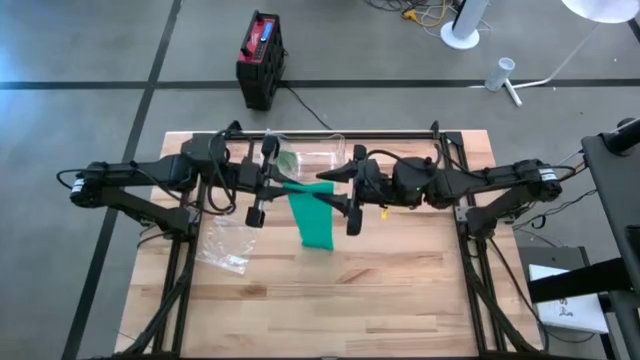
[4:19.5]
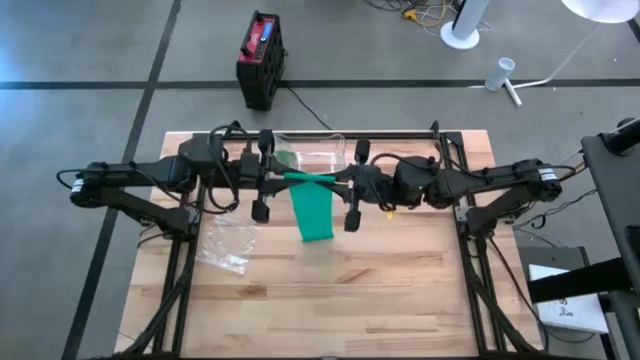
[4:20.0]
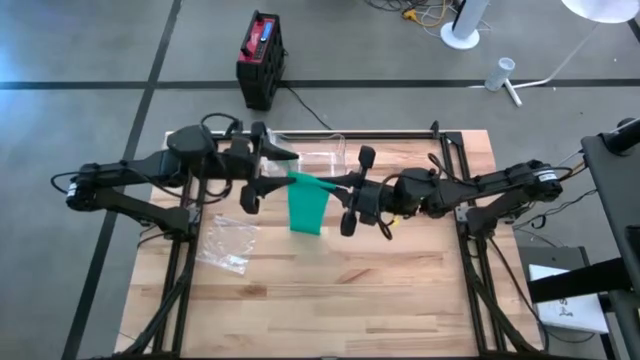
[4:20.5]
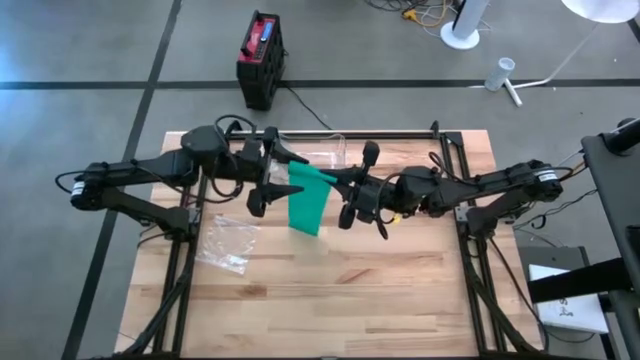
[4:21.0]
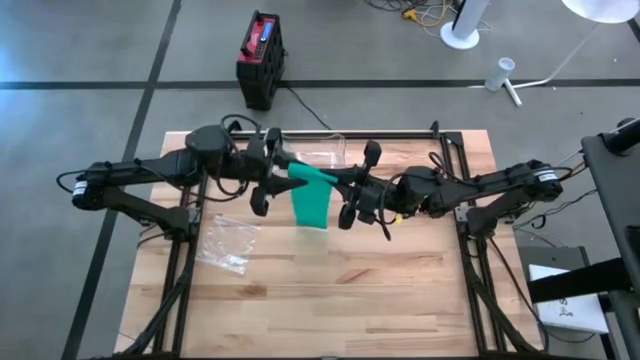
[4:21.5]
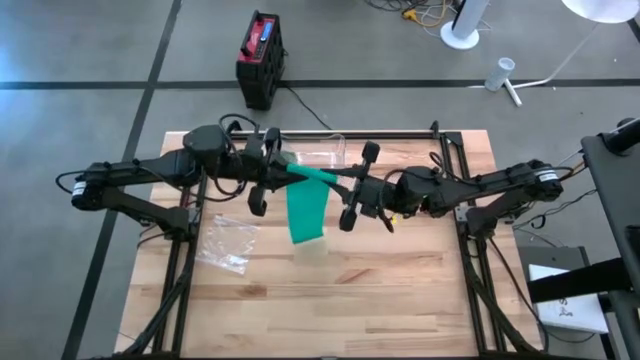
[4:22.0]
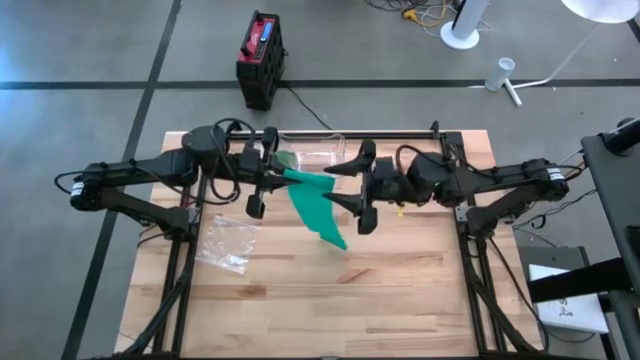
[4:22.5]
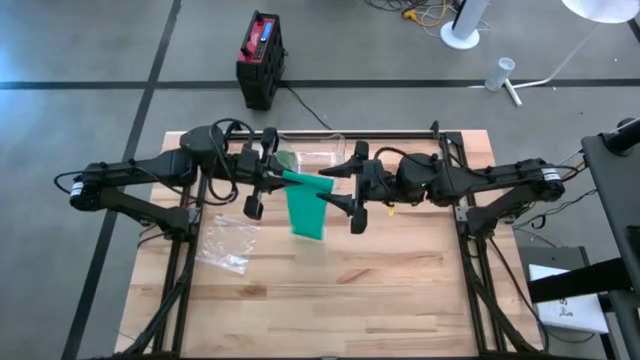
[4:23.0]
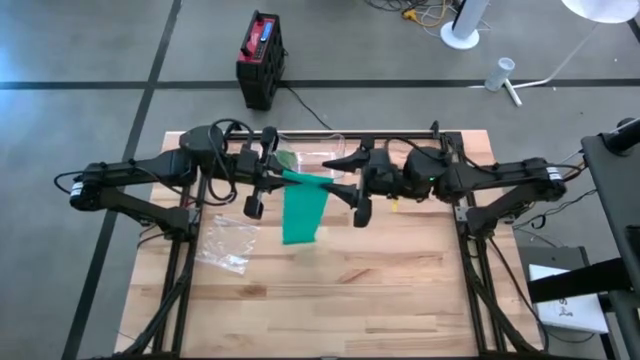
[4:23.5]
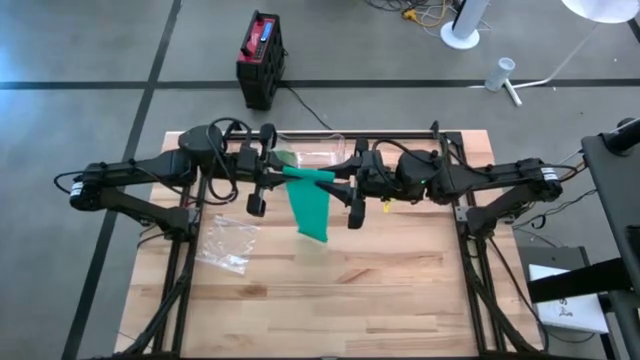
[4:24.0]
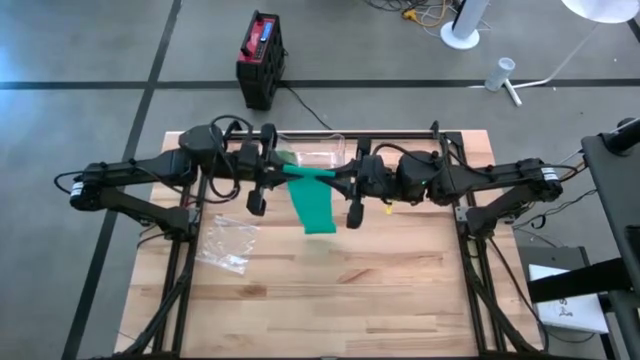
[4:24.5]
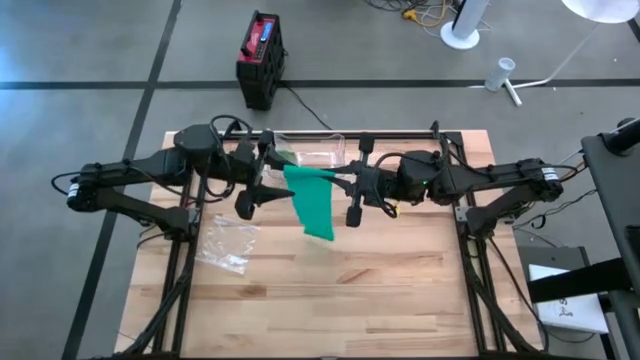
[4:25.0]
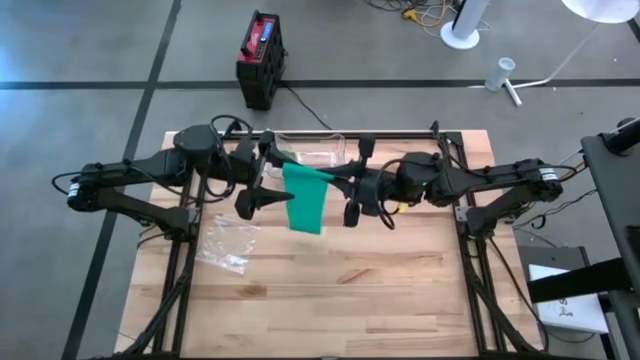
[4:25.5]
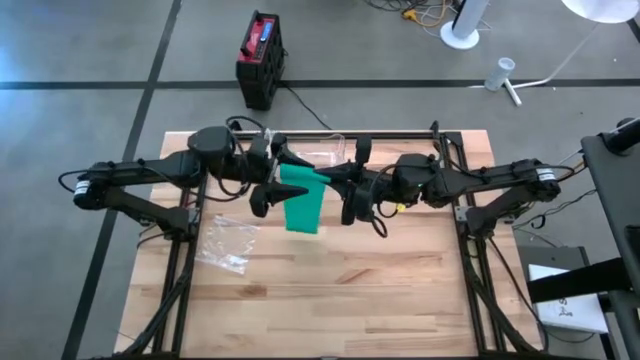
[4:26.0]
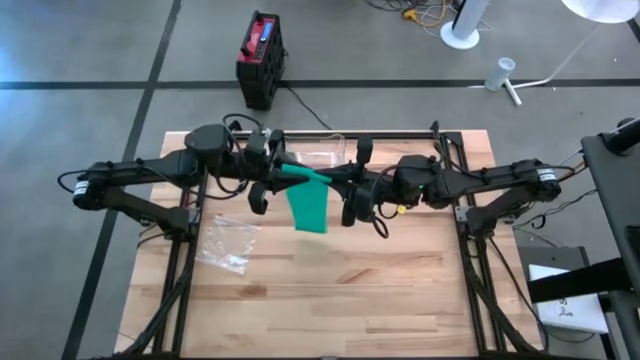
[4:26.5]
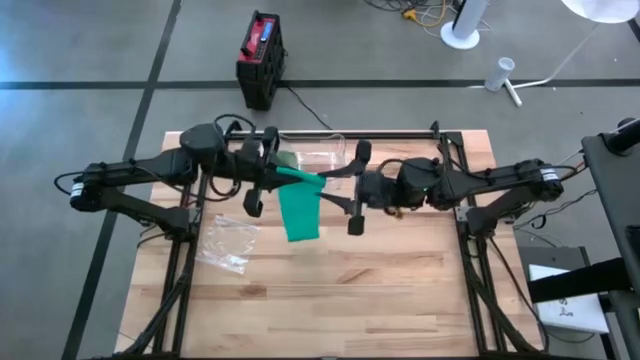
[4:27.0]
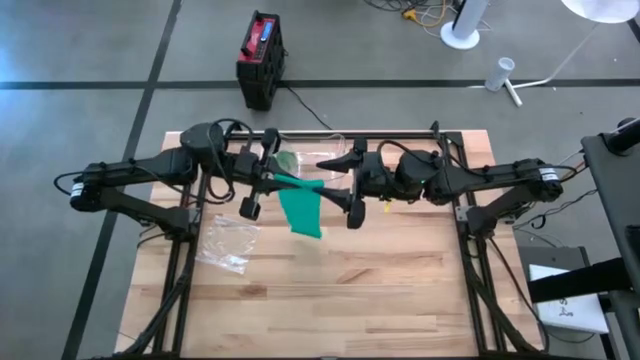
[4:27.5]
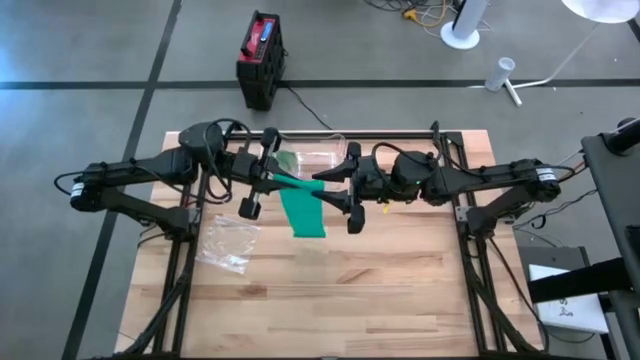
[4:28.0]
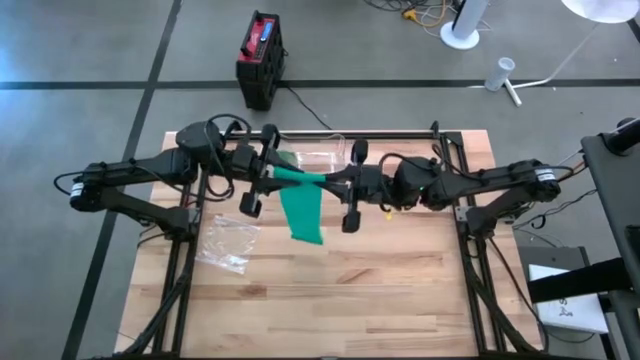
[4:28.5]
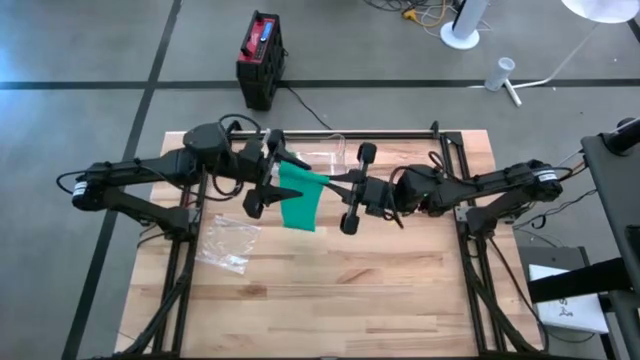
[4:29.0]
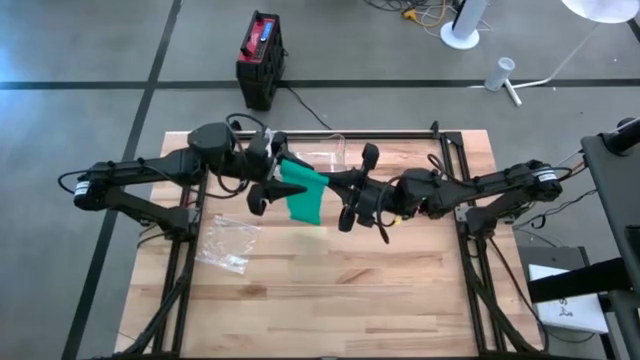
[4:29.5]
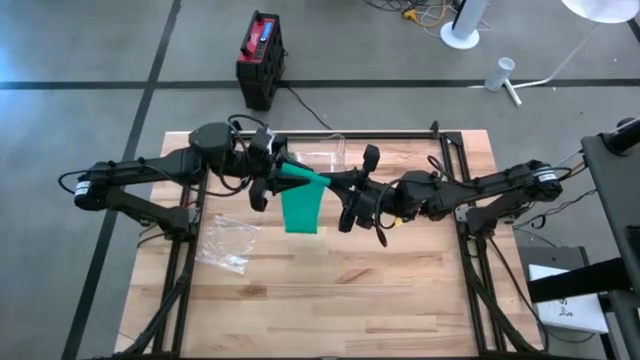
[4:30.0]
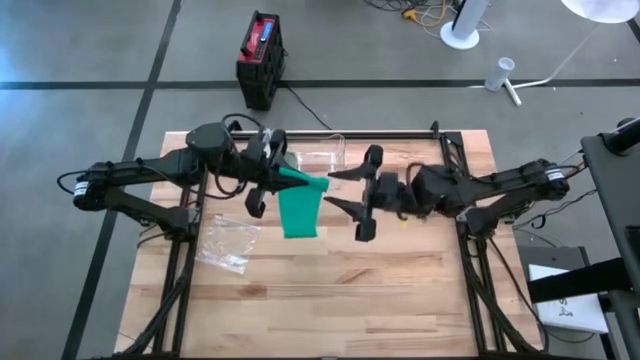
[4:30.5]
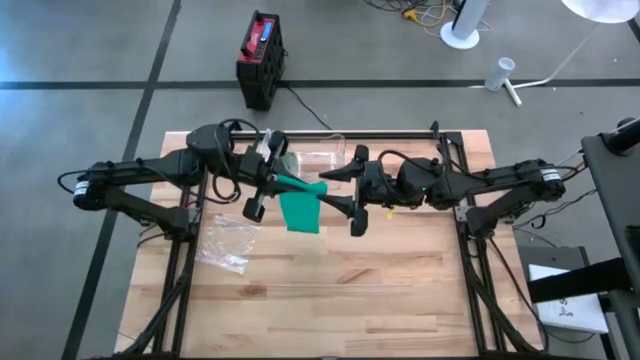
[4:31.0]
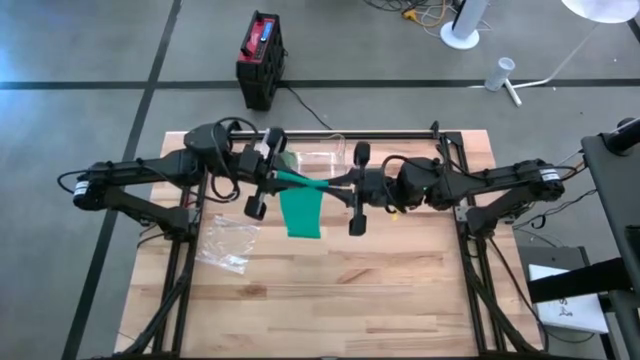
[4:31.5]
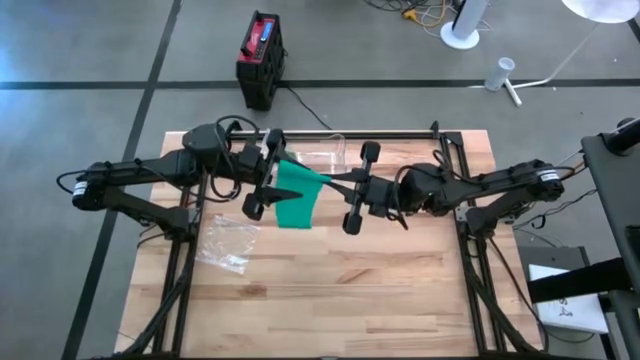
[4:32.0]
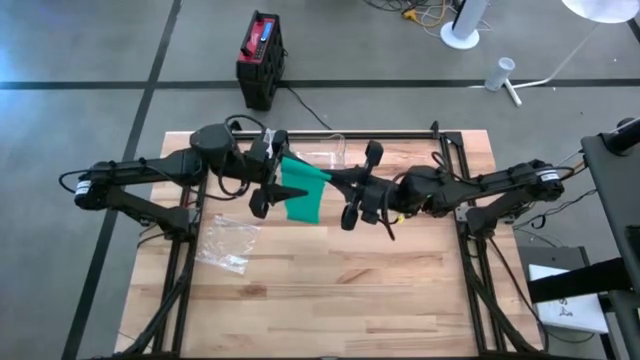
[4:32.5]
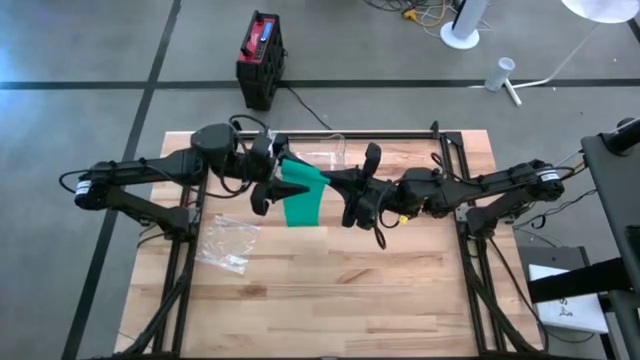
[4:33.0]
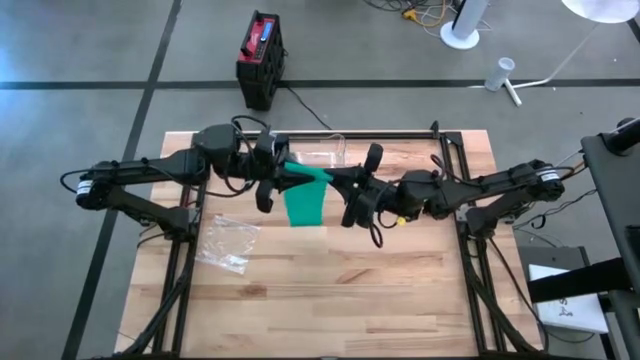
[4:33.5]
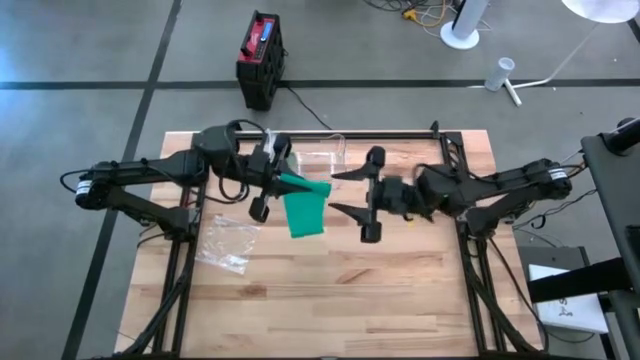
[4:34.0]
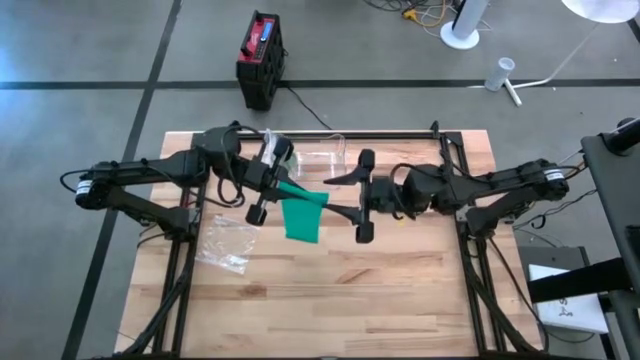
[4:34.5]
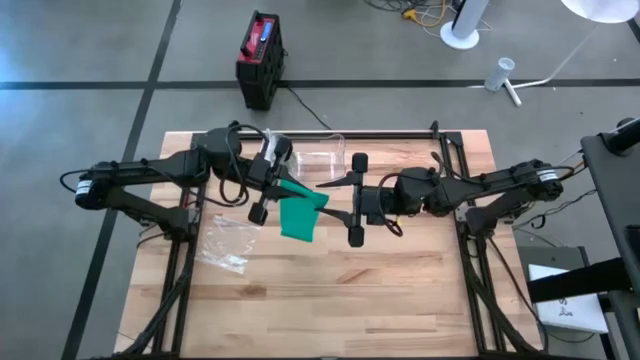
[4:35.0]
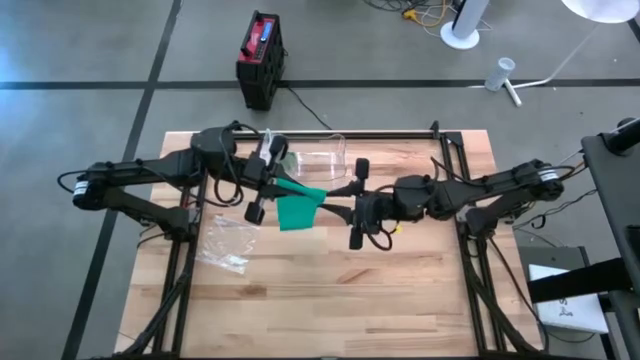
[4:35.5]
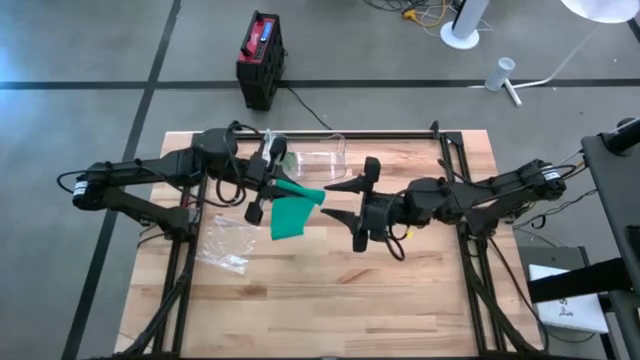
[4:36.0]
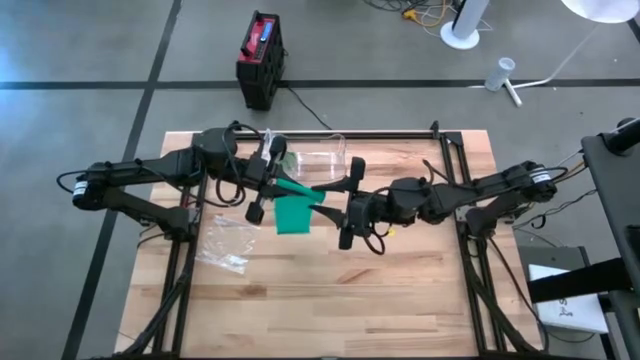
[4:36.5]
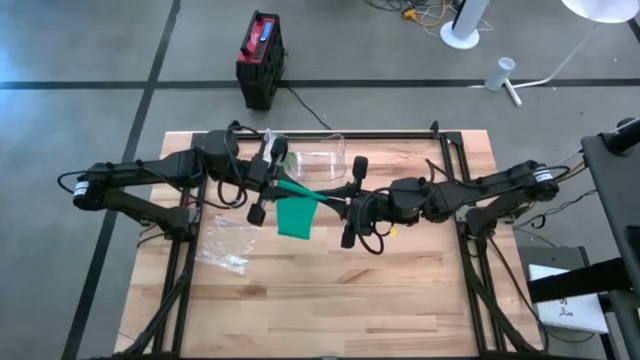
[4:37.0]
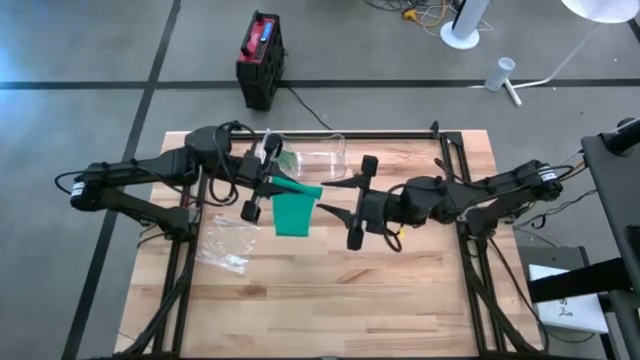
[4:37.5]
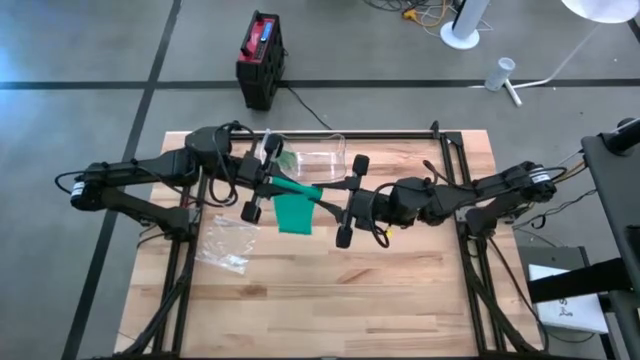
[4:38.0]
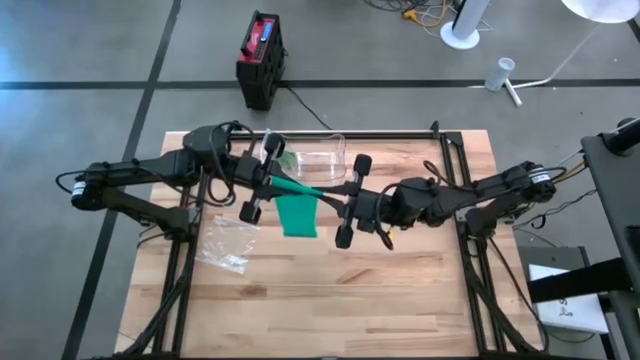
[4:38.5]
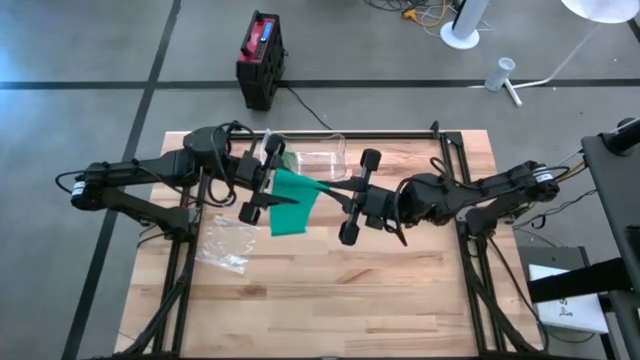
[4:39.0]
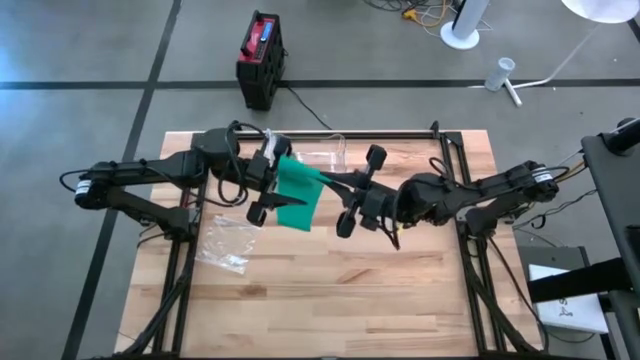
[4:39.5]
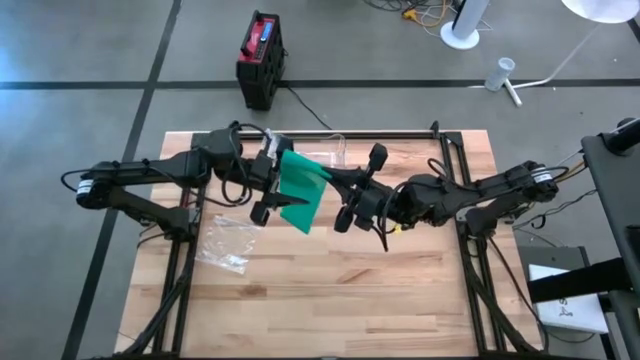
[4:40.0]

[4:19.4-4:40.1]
Task: Roll bandage
Roll the blue bandage
